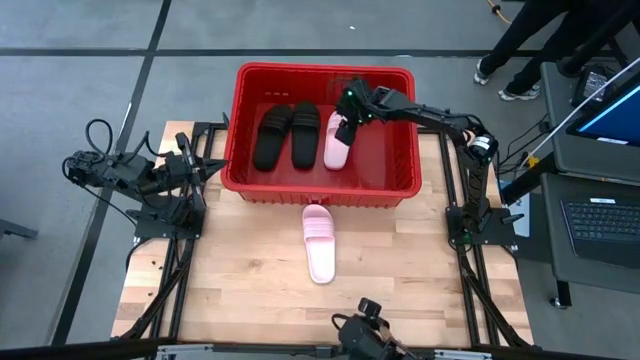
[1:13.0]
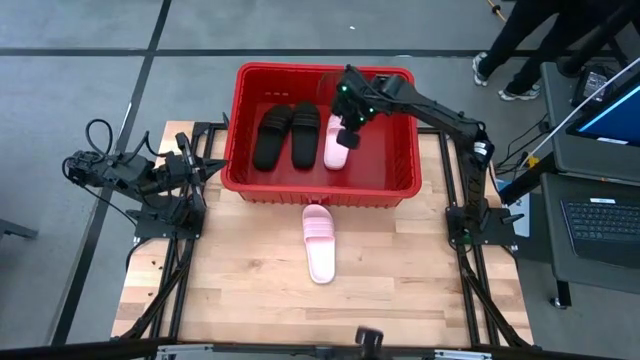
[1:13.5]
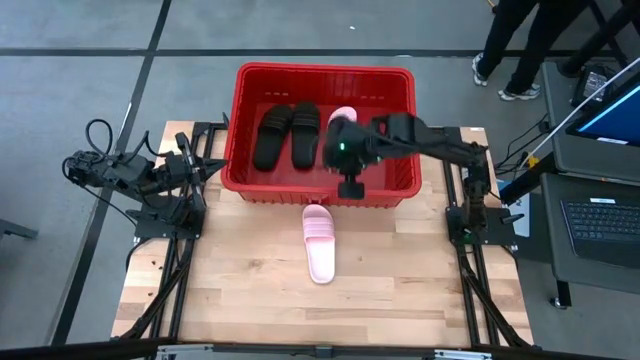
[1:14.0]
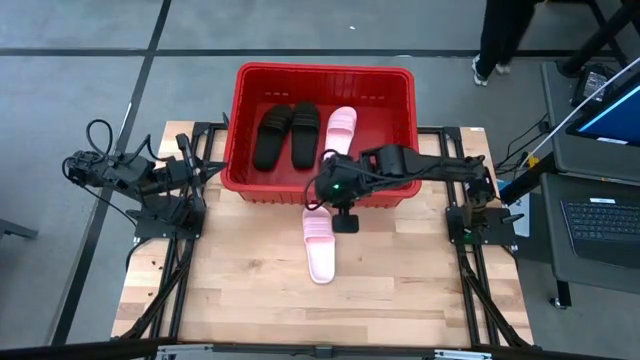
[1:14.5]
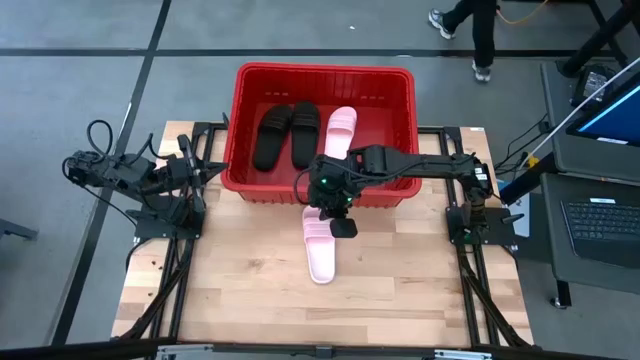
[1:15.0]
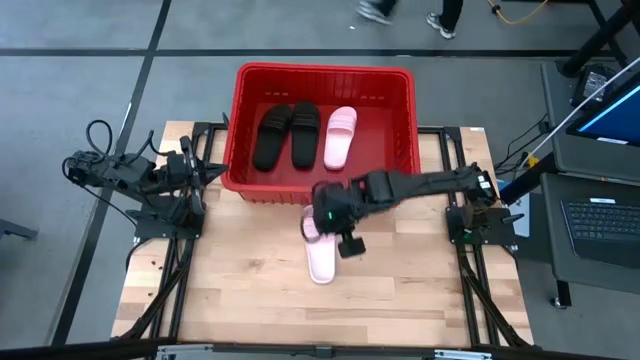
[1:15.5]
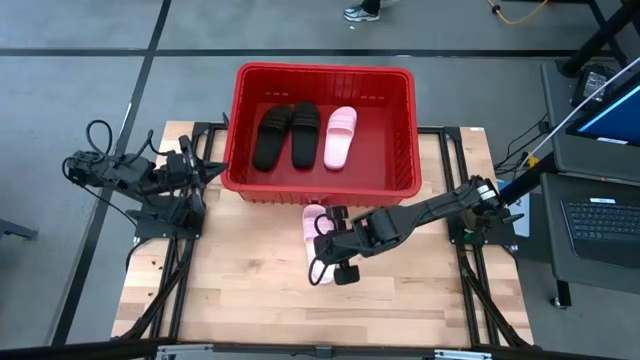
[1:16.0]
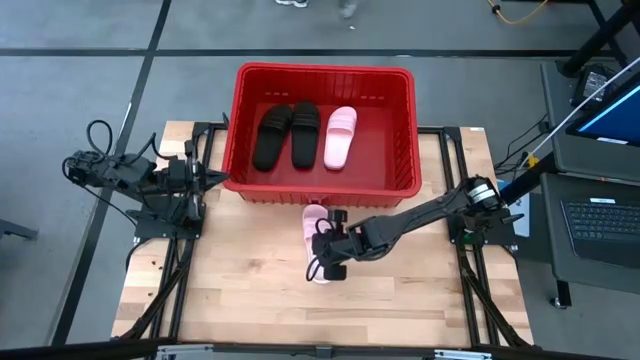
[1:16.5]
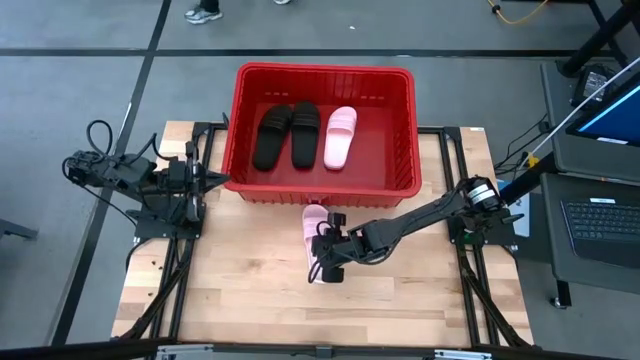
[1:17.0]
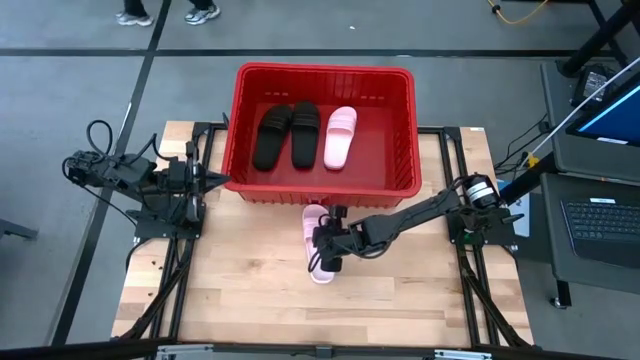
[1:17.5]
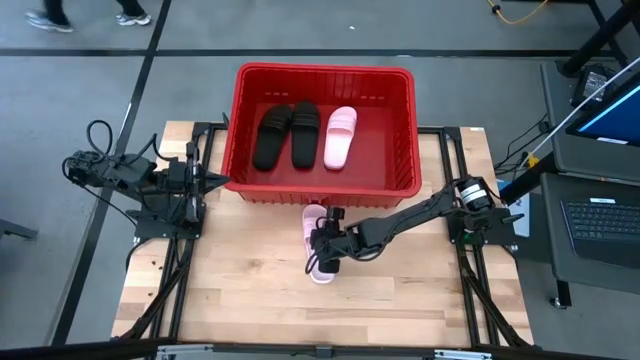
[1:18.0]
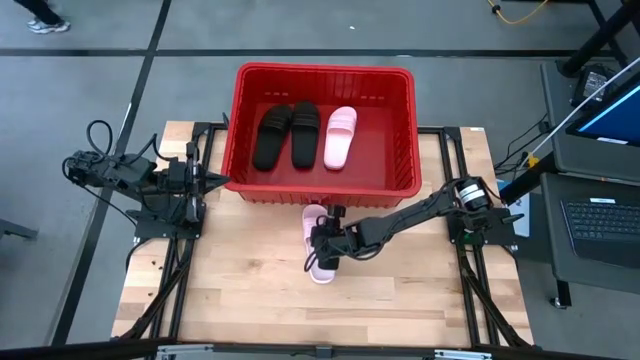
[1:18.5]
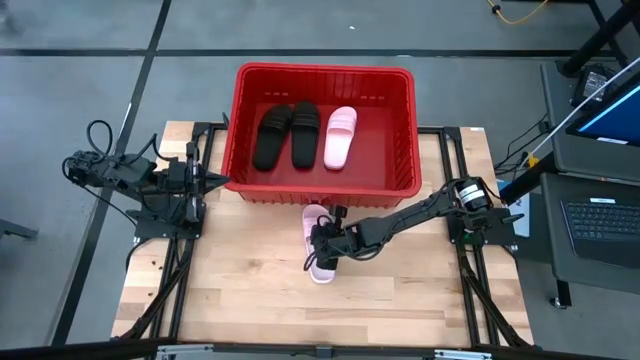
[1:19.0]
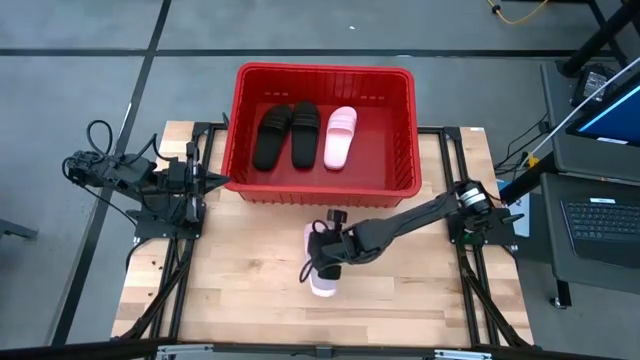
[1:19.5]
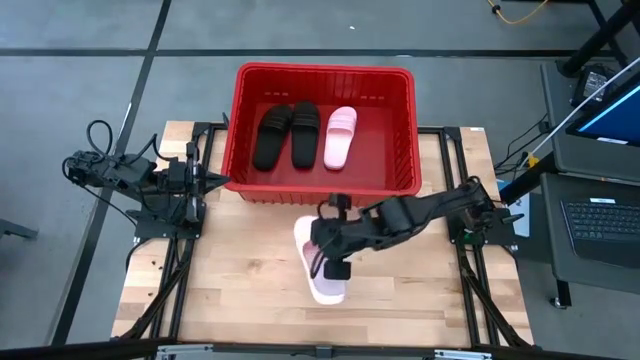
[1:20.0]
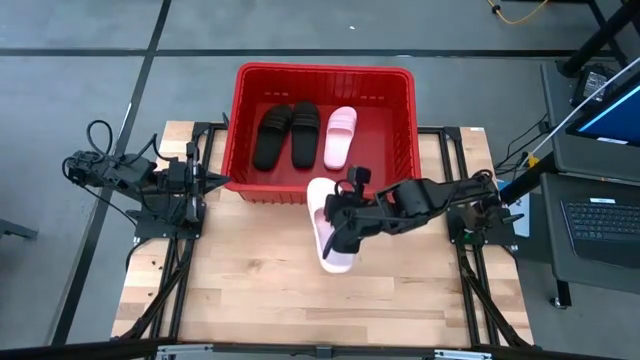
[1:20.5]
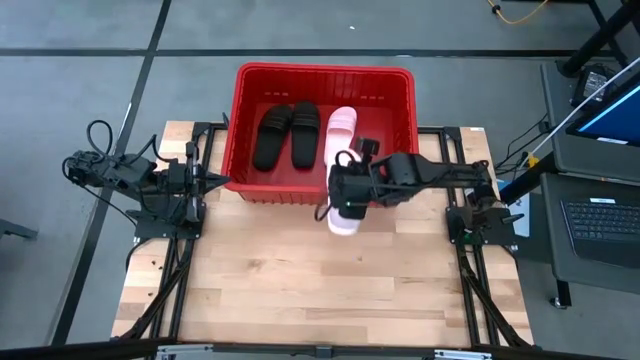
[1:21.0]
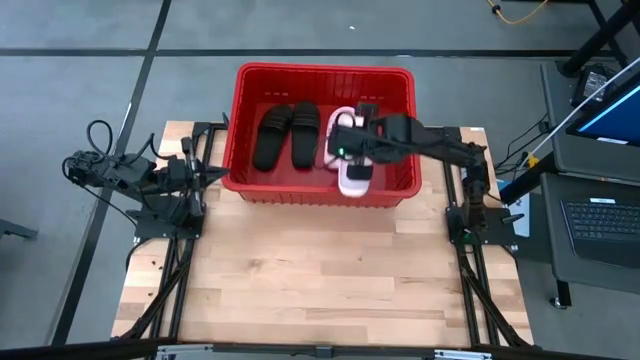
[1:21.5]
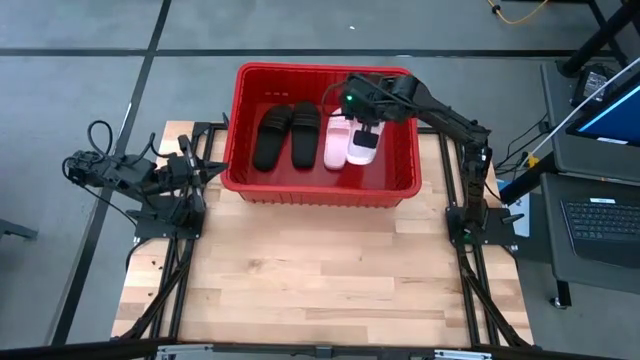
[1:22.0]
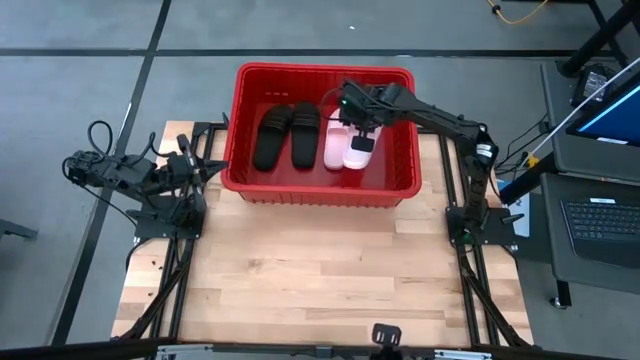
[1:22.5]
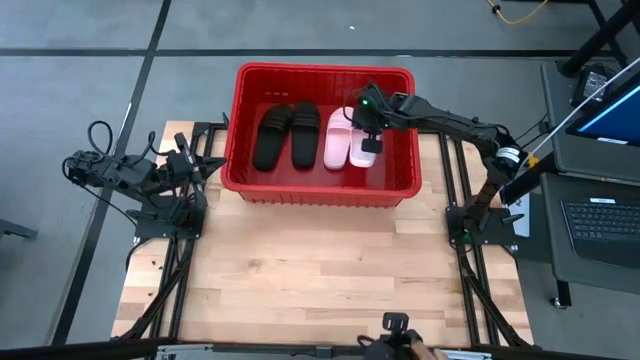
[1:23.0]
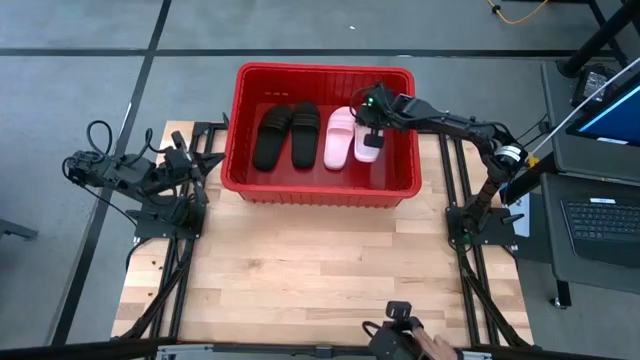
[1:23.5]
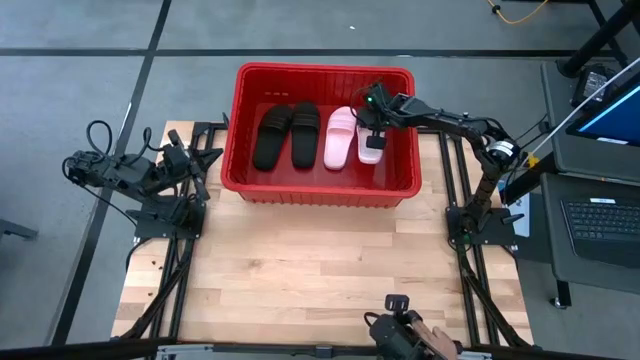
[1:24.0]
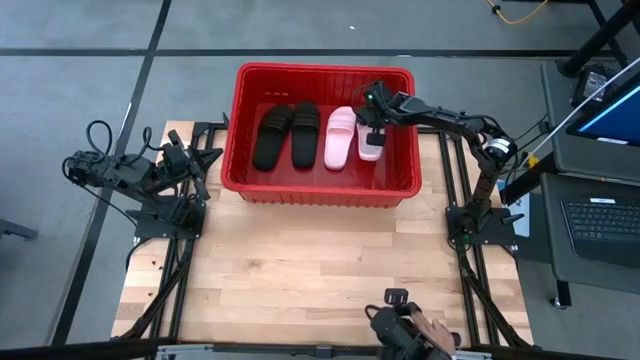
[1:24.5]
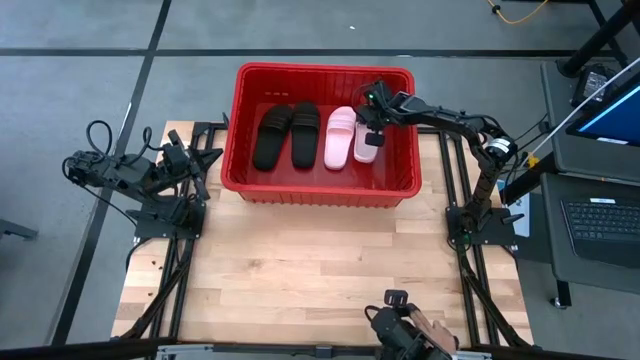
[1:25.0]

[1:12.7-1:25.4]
Task: Pick and place slides into bin
Put the pink slipper into the red bin

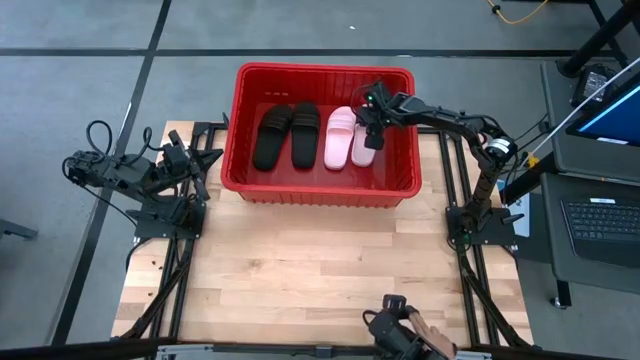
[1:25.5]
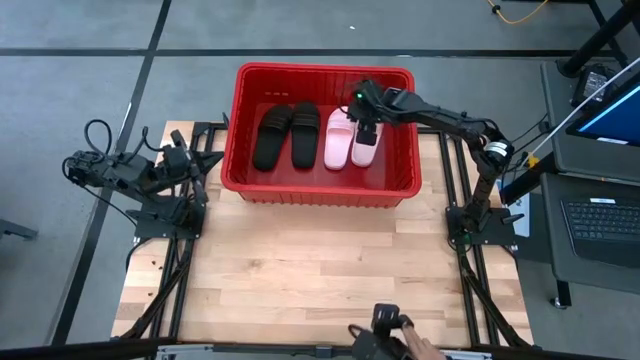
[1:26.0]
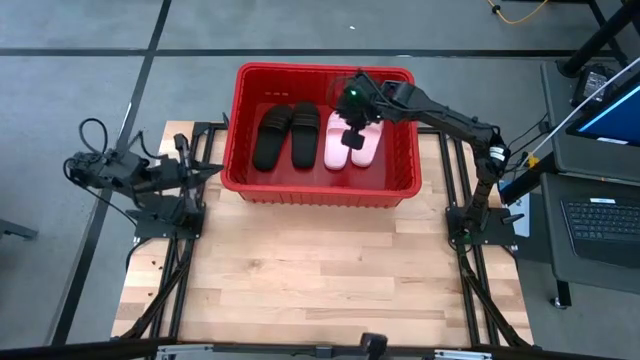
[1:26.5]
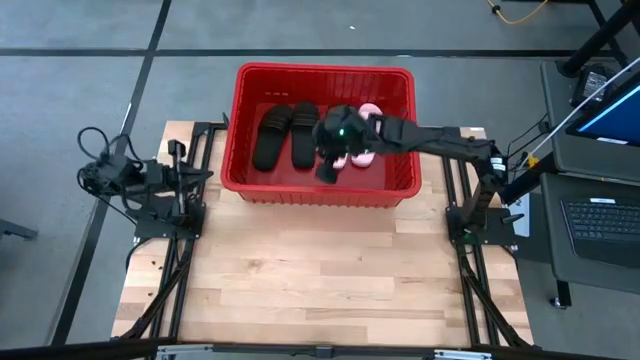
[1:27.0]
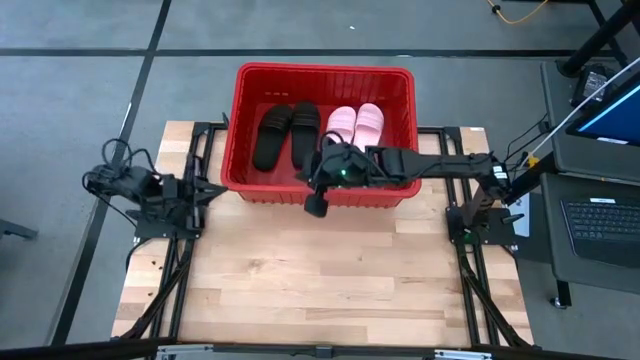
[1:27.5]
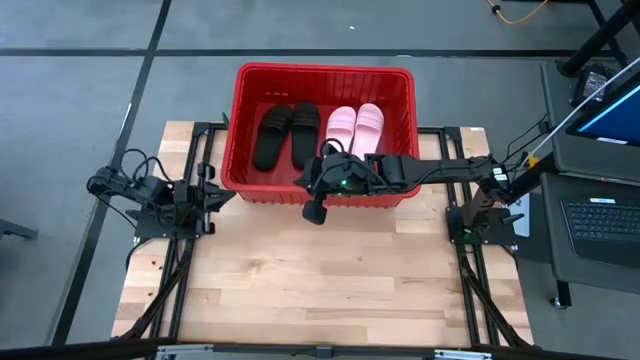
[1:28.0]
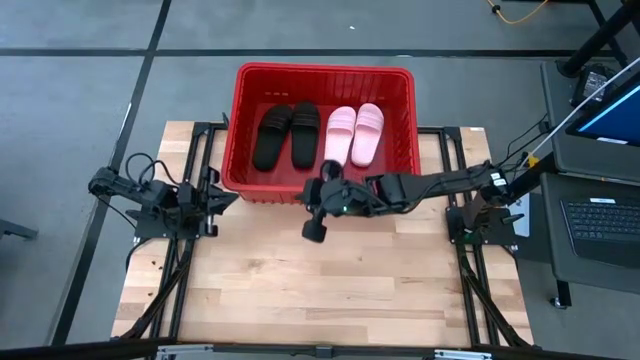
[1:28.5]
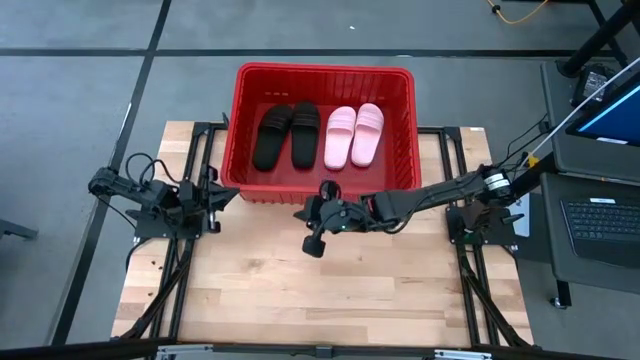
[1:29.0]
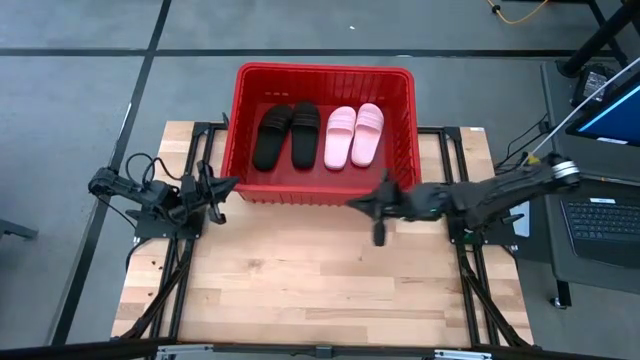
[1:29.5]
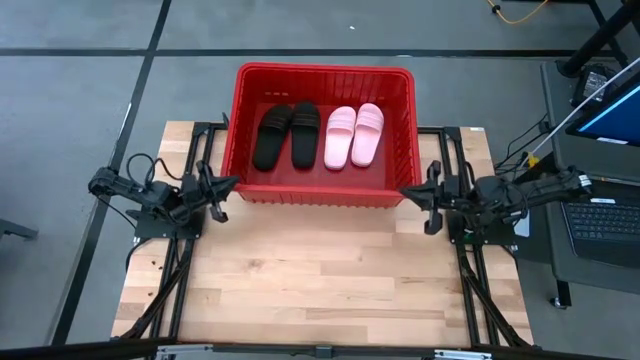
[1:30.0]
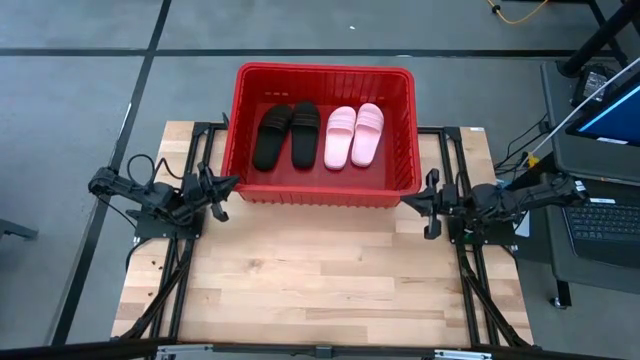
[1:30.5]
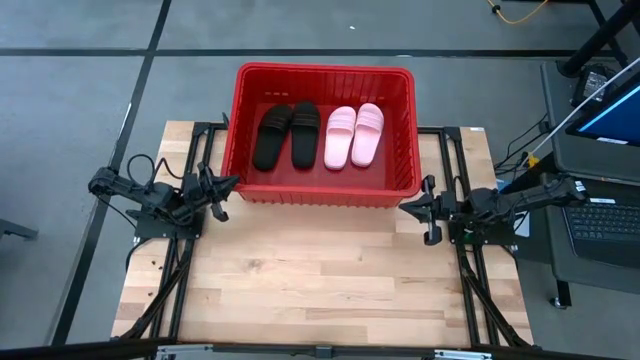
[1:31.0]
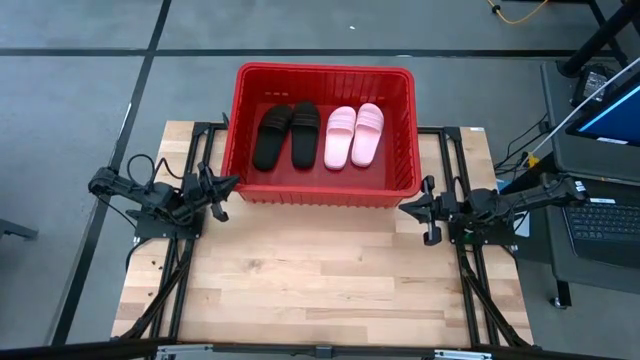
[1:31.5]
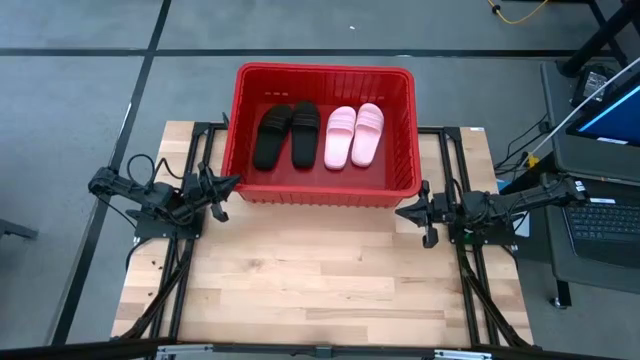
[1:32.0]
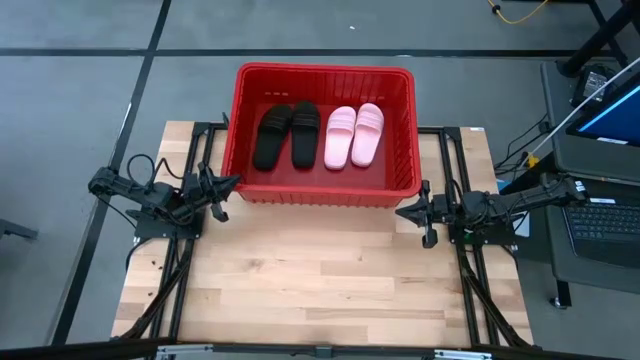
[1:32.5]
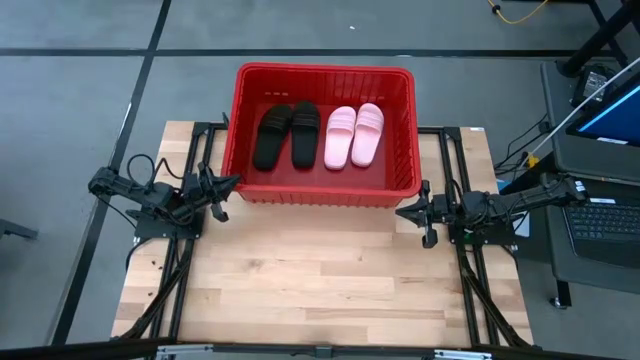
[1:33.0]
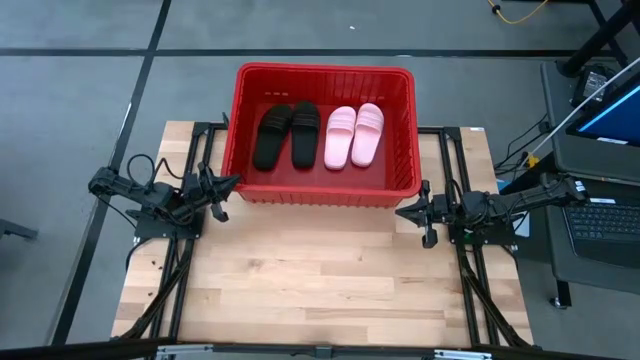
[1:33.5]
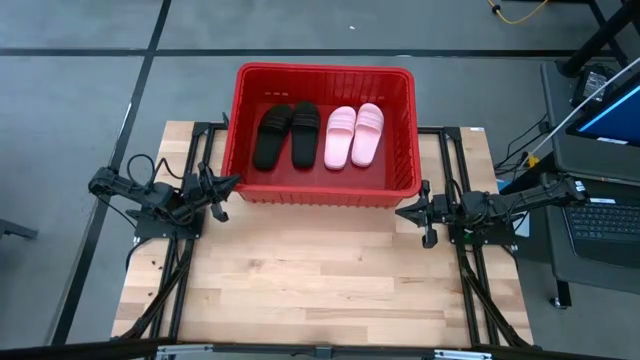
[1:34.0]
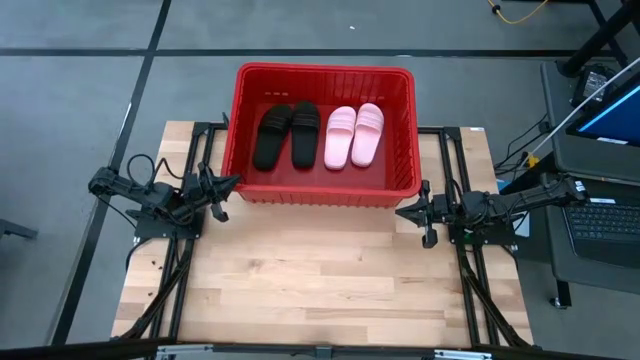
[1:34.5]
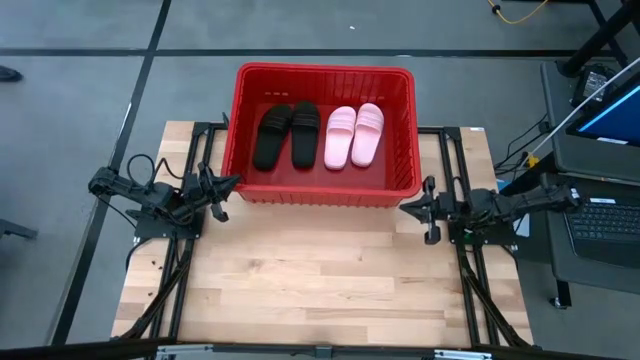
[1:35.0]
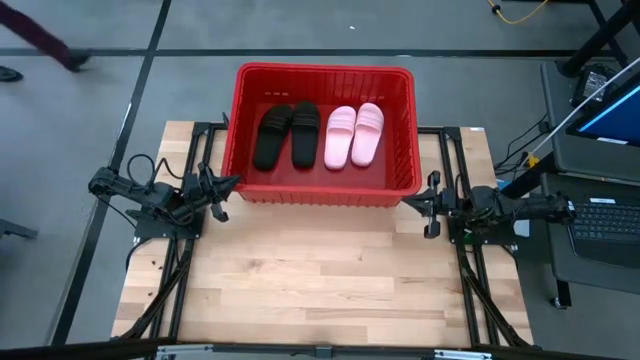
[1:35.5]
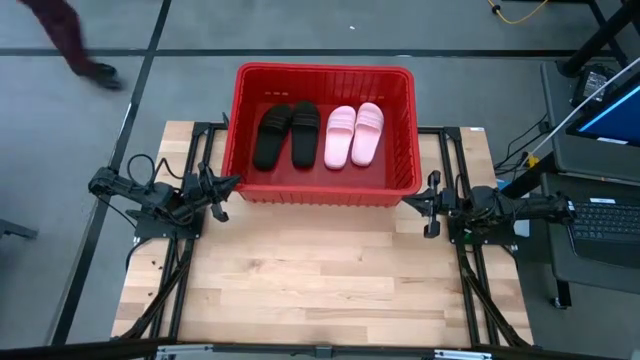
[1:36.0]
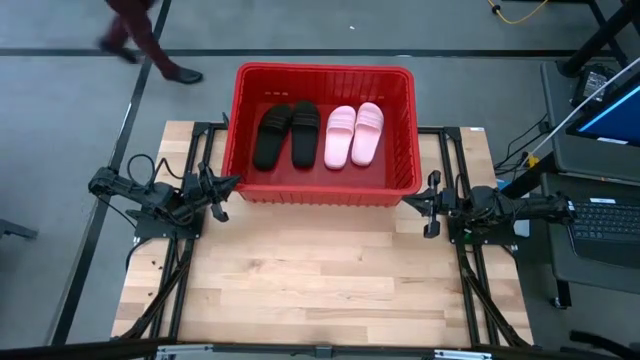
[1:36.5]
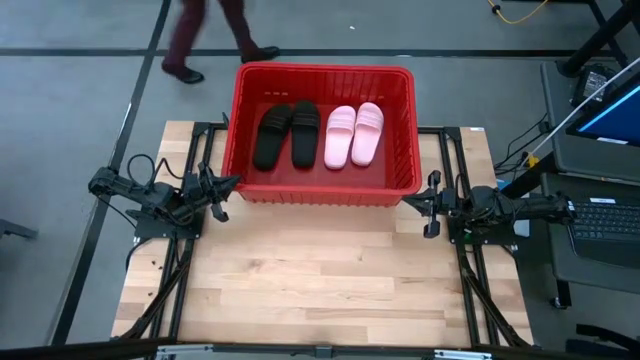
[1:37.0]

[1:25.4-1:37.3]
Return to Home Position
